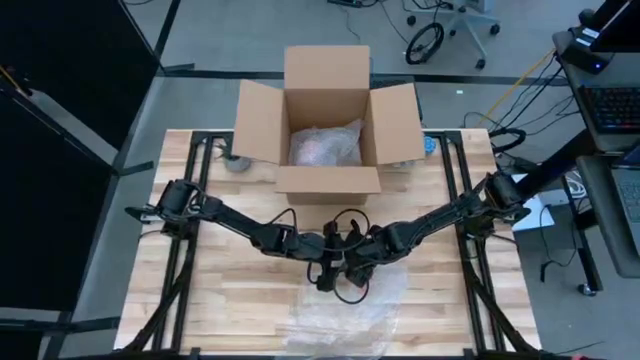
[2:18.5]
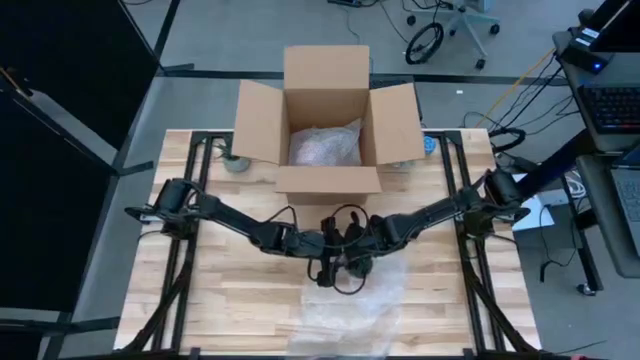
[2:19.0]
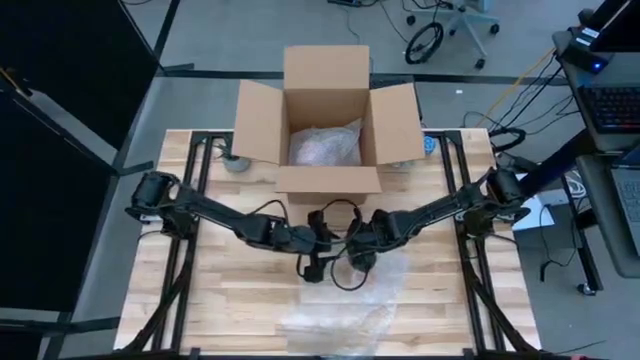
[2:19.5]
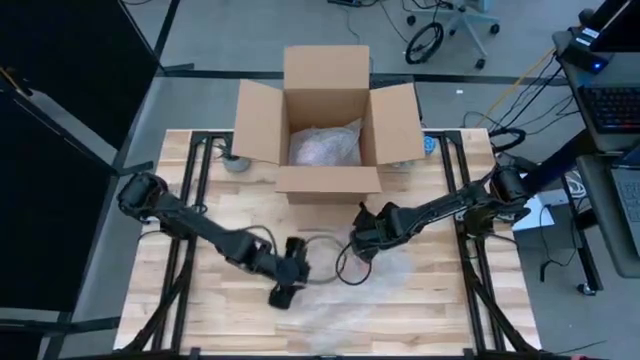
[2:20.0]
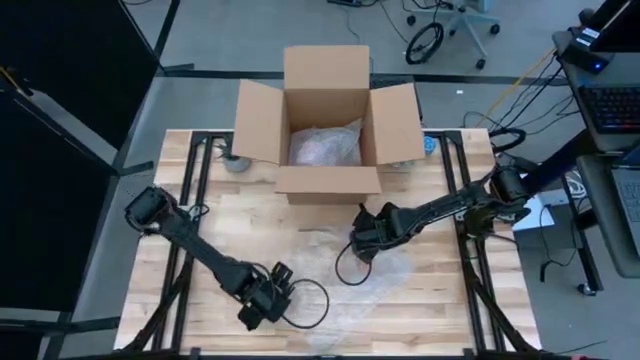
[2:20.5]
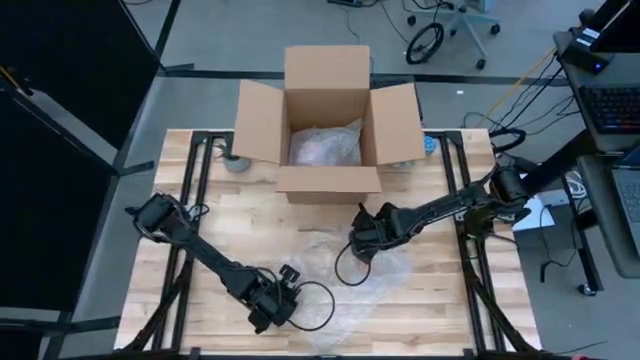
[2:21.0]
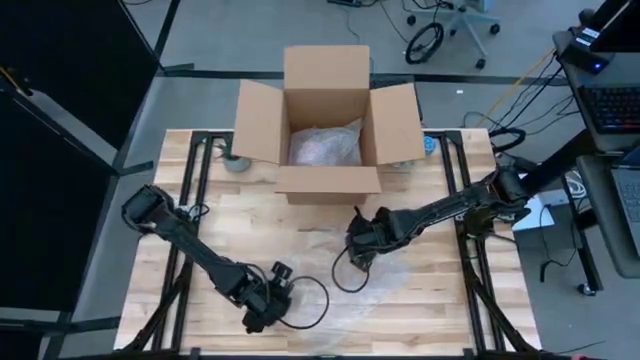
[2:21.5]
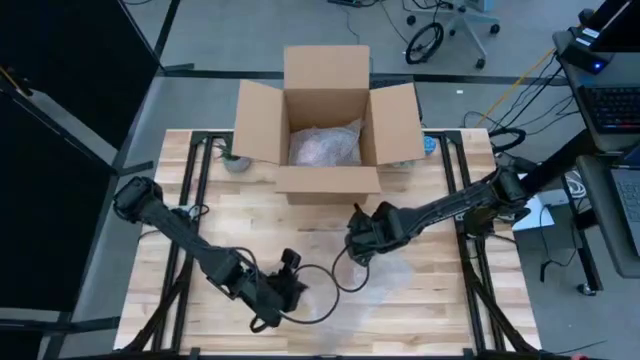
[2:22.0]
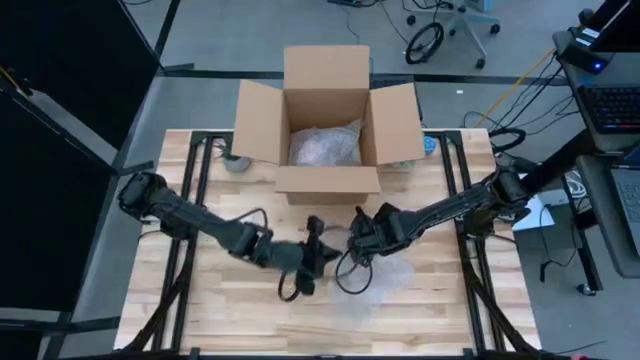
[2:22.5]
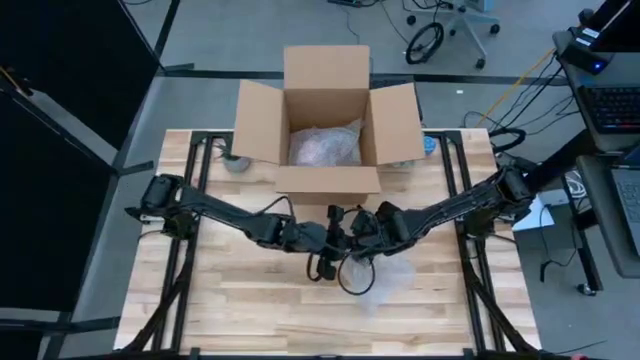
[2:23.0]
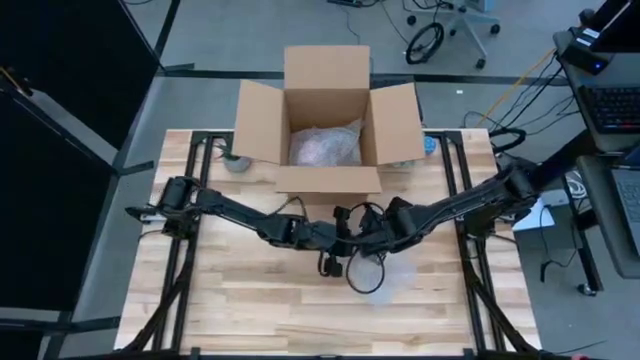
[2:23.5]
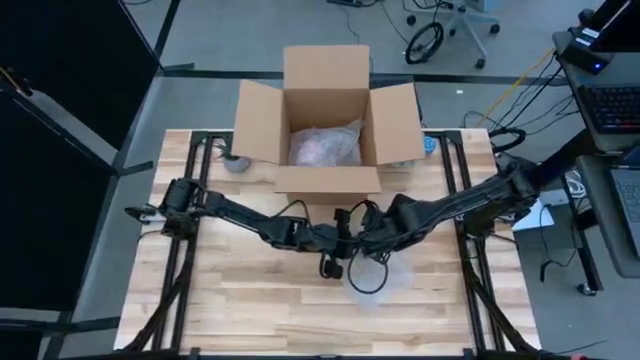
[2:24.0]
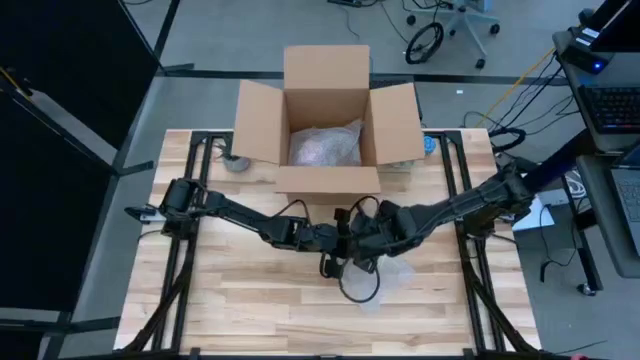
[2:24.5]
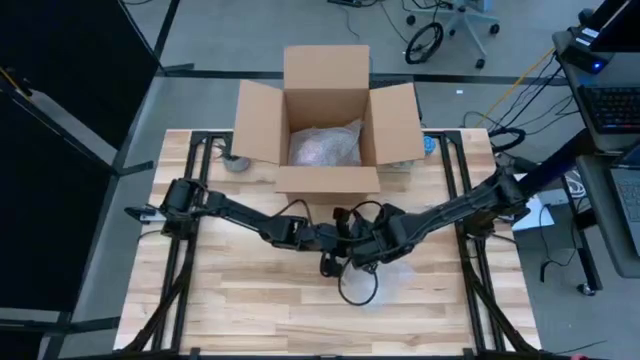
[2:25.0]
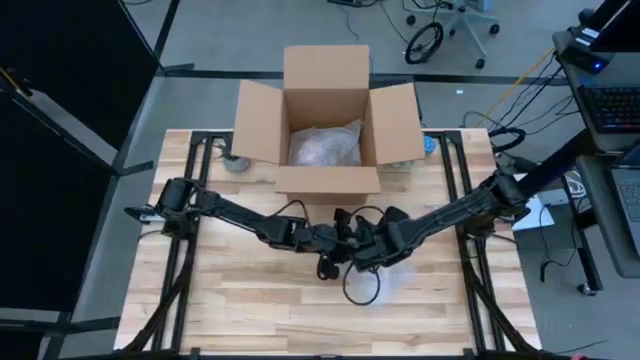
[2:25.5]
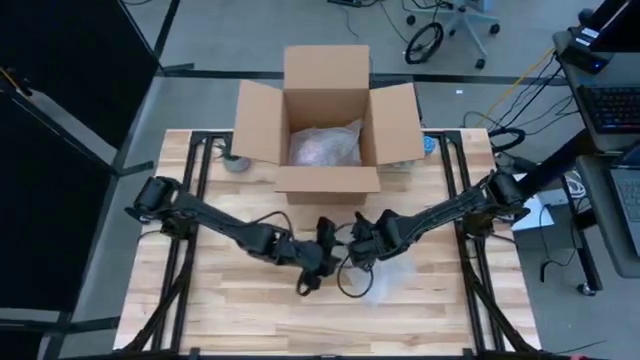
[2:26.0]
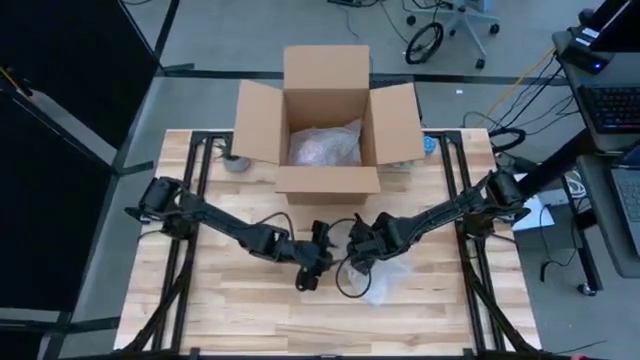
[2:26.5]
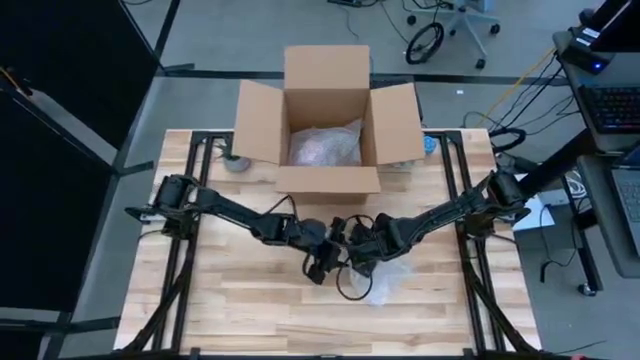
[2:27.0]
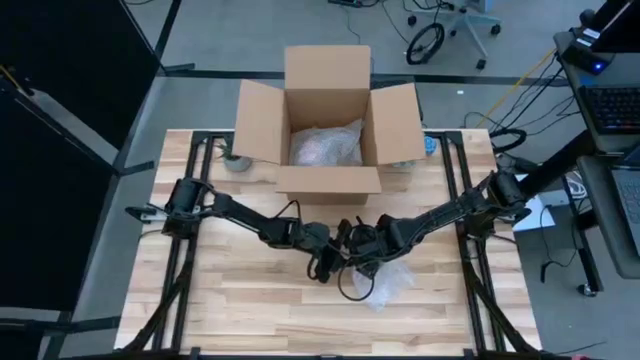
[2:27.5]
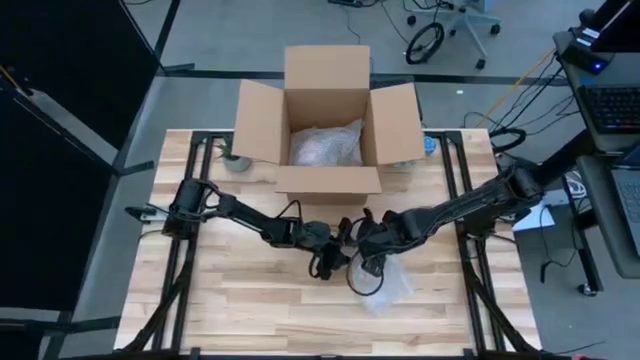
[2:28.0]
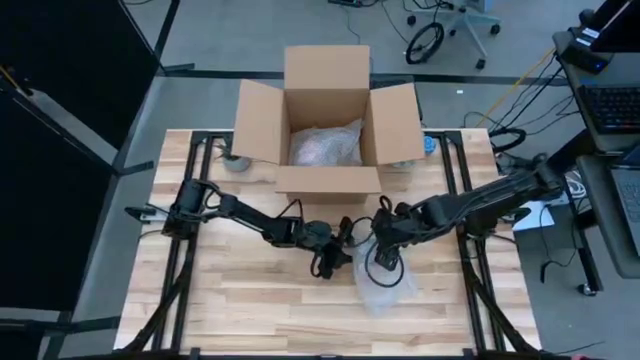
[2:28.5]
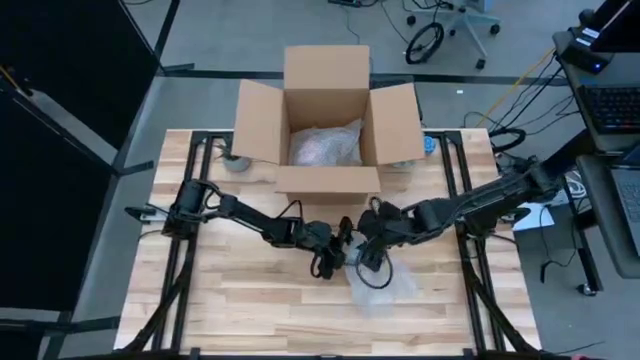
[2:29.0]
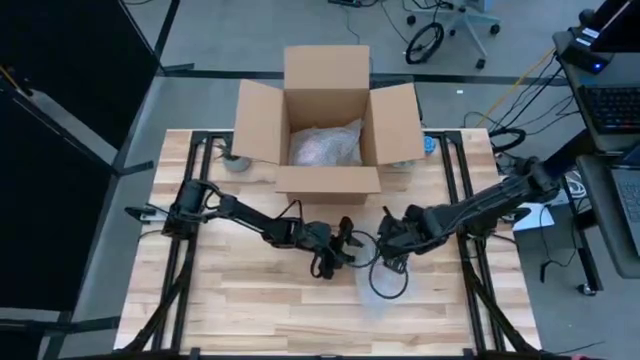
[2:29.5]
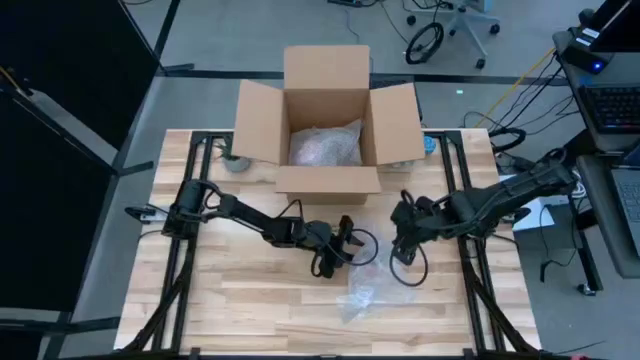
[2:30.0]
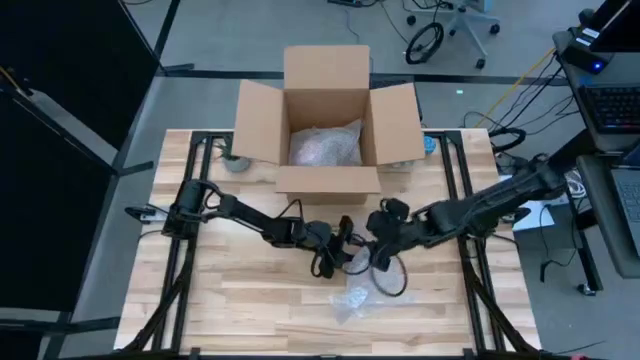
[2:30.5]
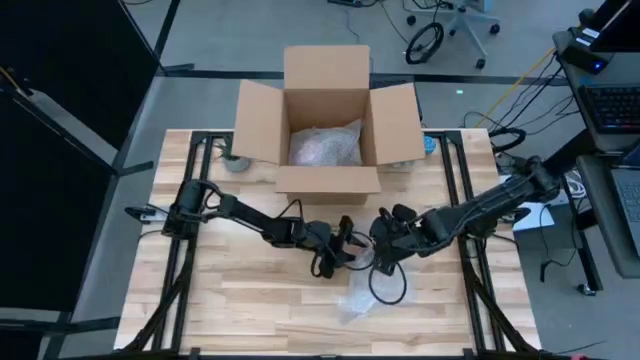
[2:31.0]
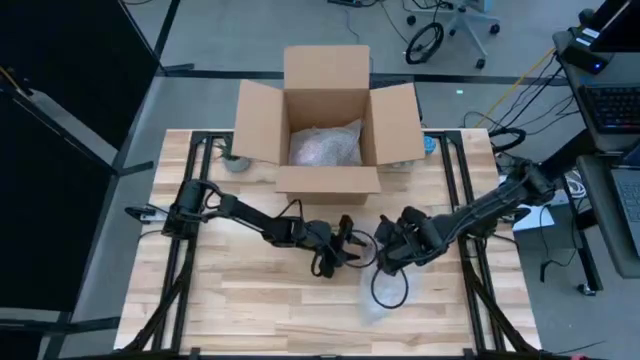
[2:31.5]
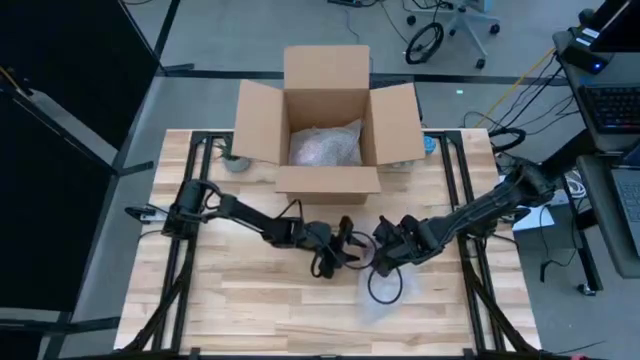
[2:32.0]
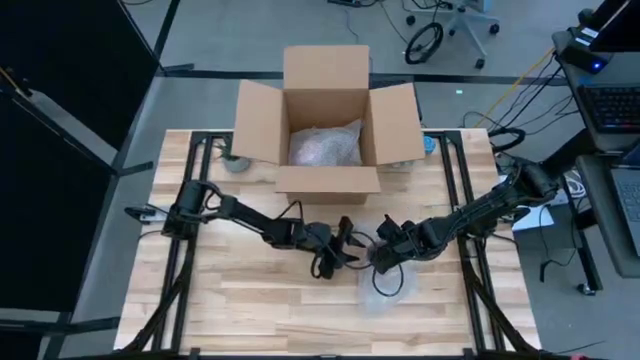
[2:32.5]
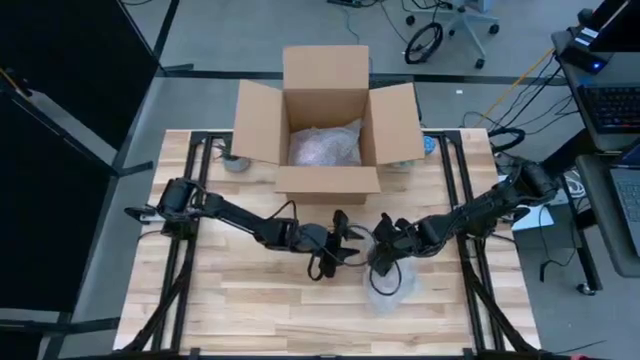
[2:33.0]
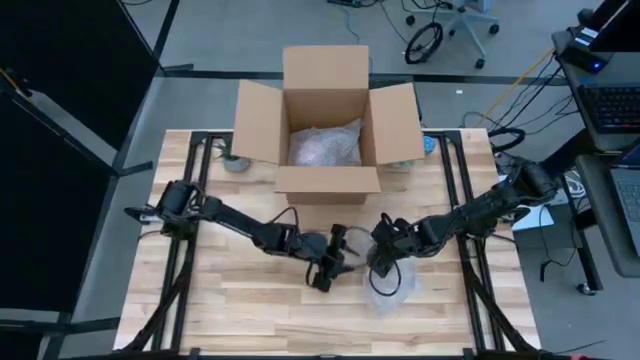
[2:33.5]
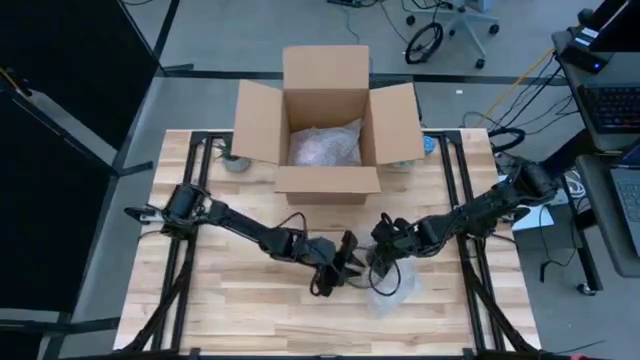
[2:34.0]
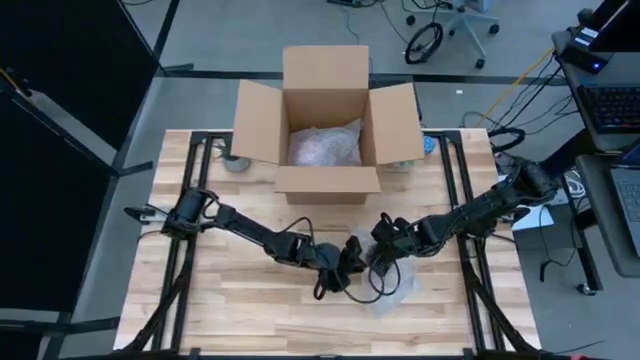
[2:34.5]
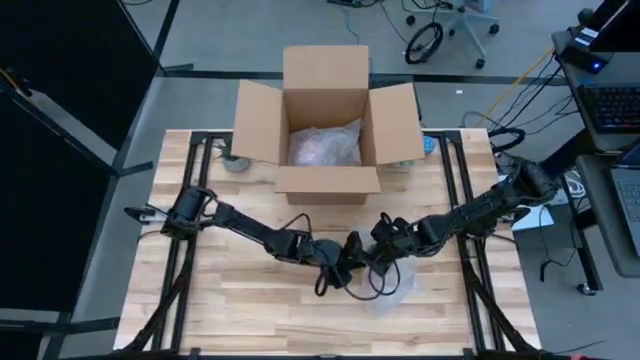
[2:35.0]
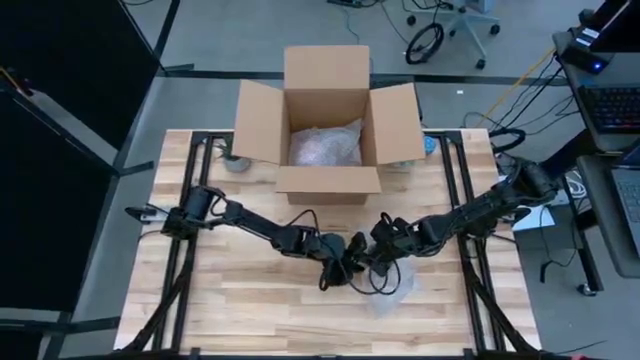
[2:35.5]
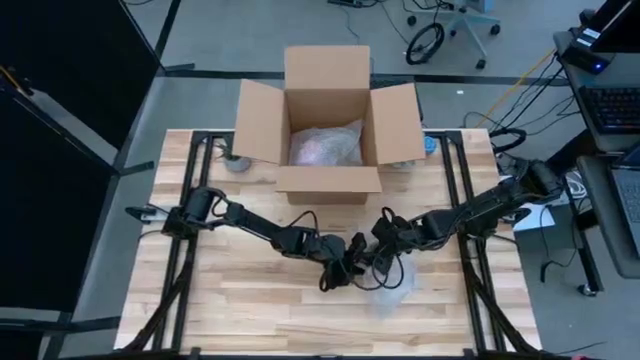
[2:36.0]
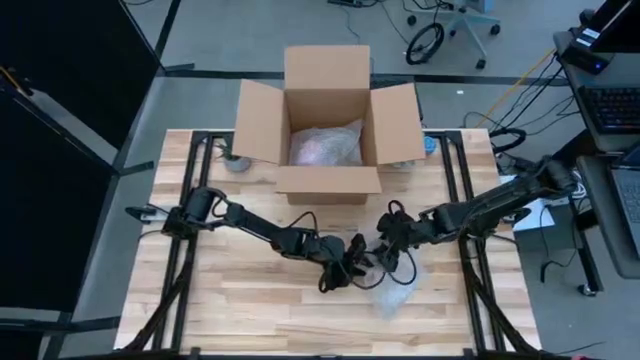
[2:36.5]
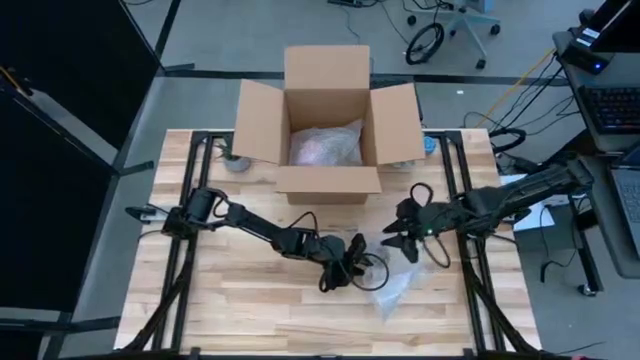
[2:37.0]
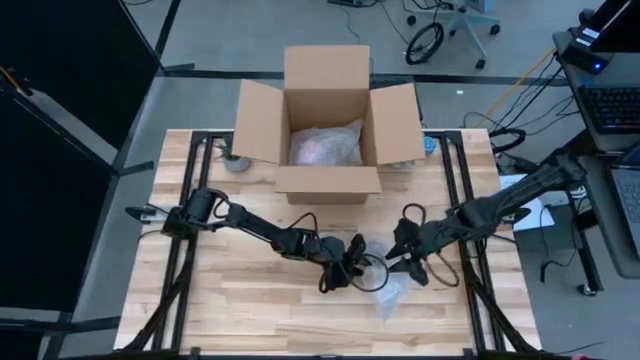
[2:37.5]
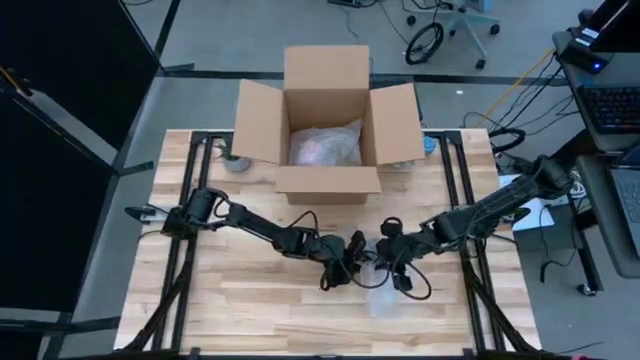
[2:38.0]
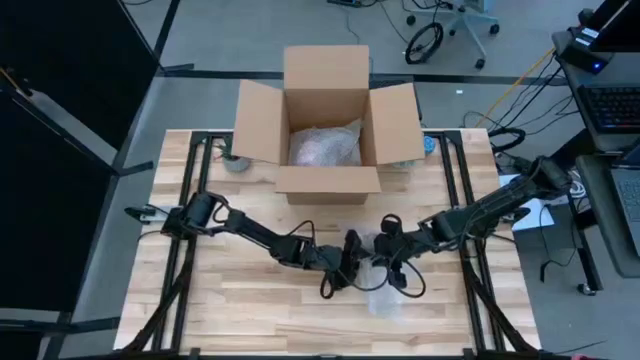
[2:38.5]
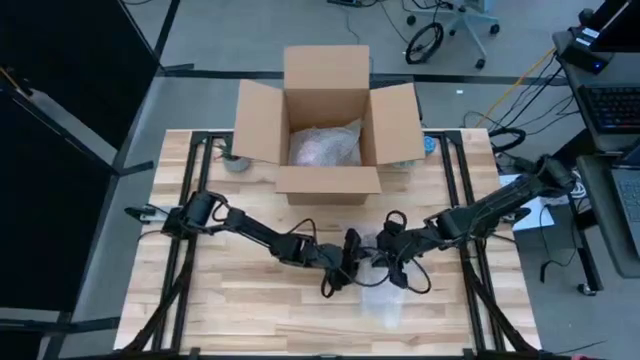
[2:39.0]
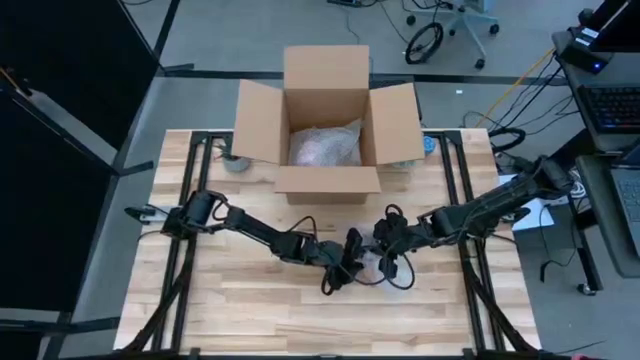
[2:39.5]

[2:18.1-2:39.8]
Task: wrap mug
Wrap the orange mug with transparent bubble wrap
